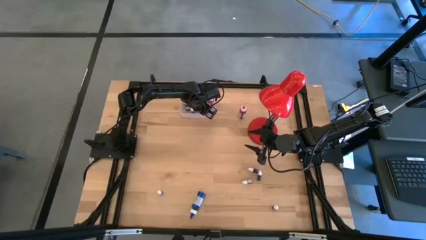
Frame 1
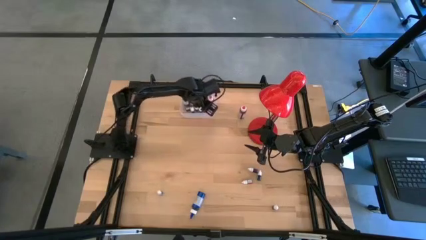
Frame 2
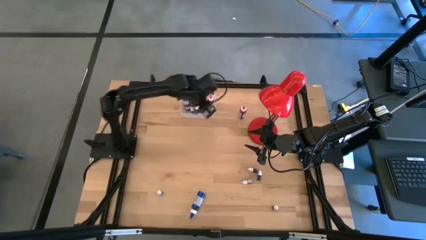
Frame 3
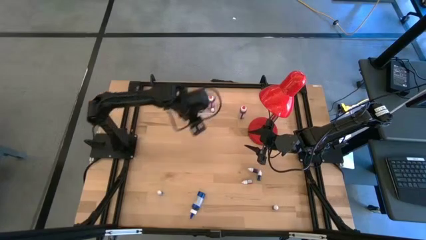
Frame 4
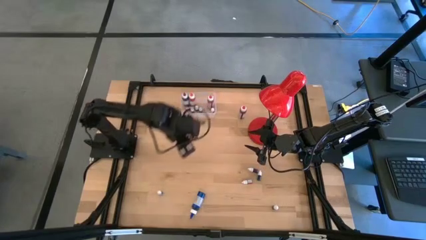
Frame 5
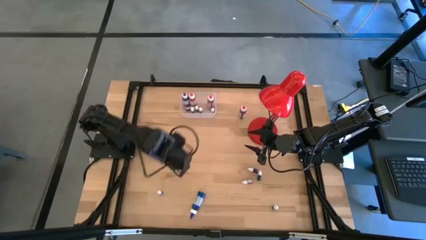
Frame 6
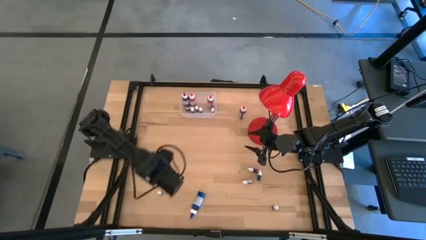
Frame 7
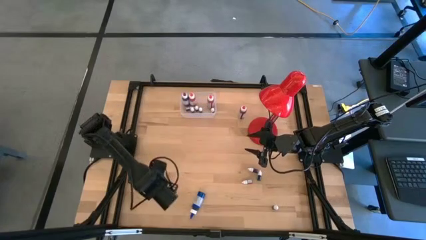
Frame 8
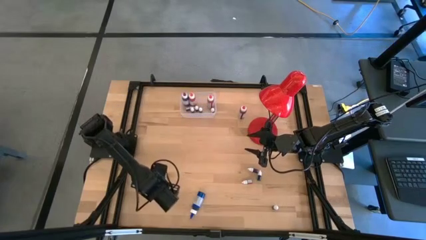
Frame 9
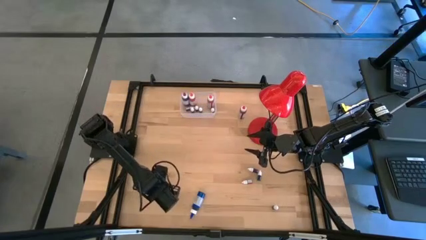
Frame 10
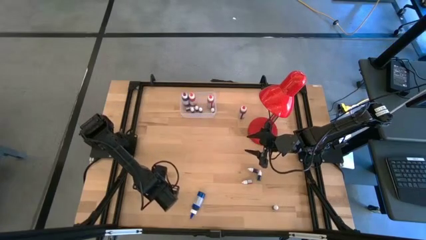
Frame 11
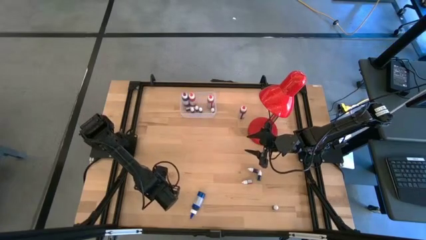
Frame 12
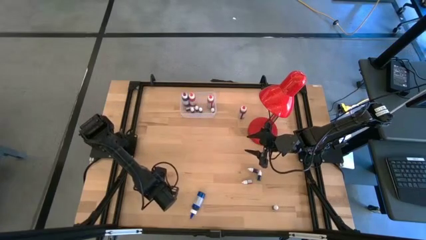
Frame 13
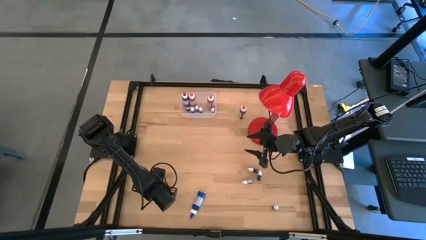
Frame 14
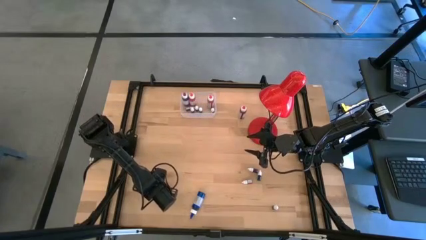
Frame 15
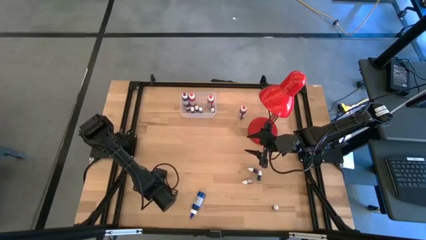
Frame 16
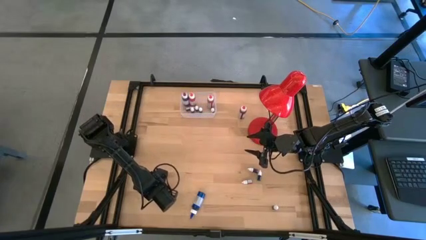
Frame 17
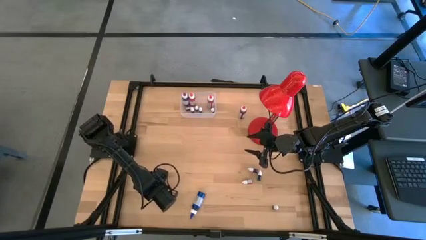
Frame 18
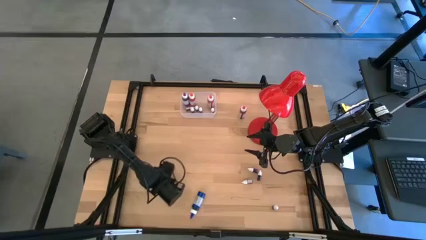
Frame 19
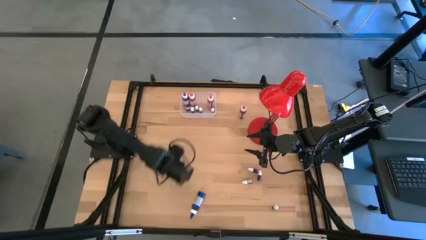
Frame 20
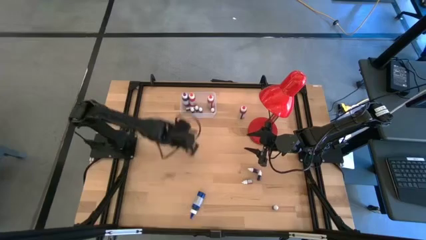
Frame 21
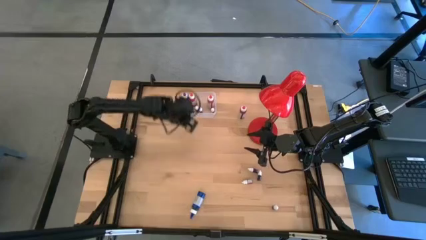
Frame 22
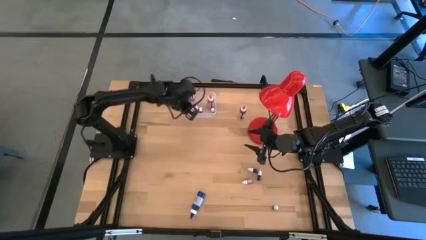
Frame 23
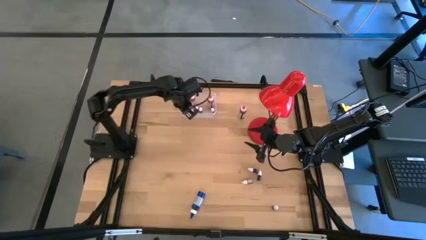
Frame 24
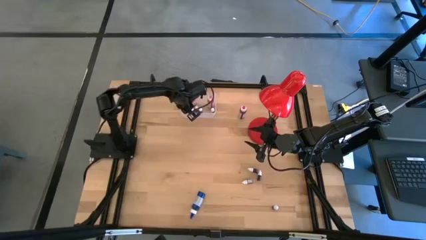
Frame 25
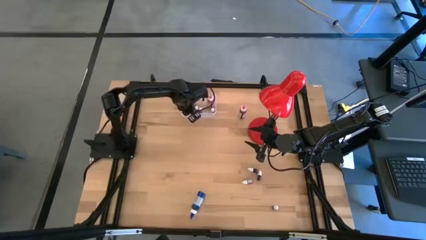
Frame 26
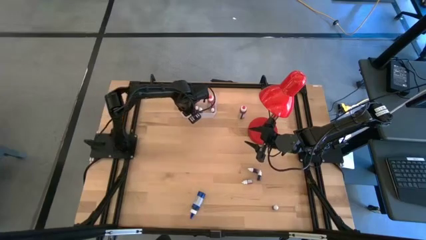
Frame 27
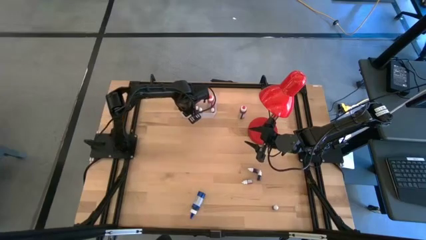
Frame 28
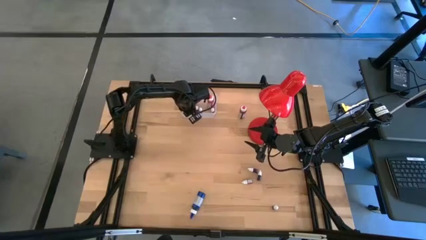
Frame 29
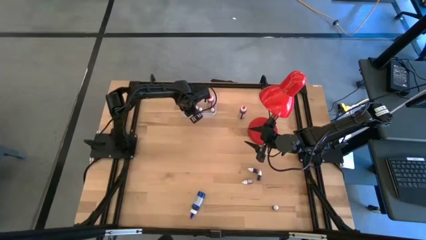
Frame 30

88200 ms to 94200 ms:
Task: Pick & Place food coloring
Put the top small black food coloring bottle into the transparent bin

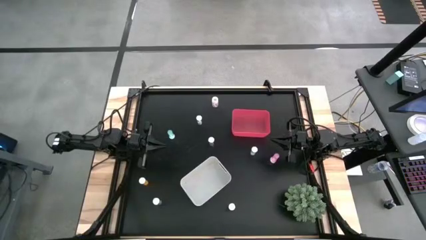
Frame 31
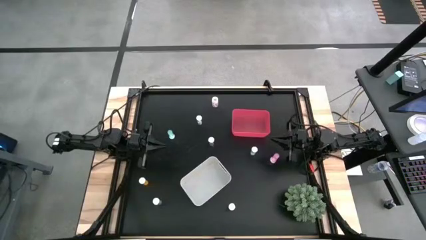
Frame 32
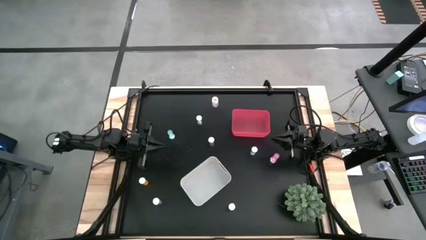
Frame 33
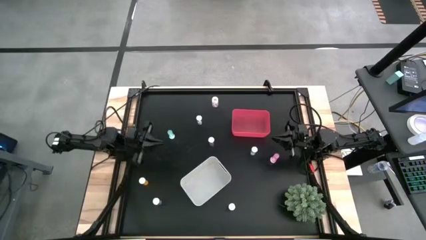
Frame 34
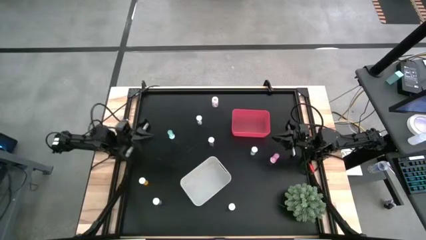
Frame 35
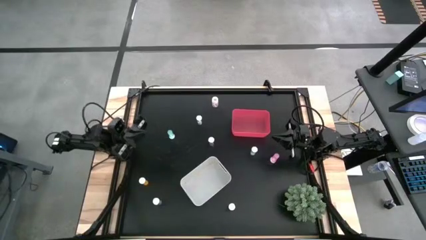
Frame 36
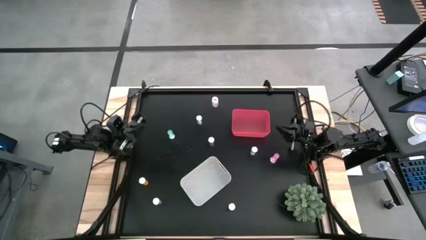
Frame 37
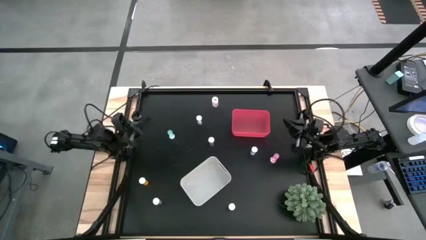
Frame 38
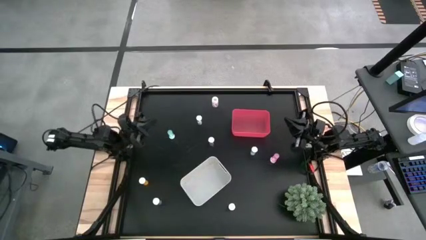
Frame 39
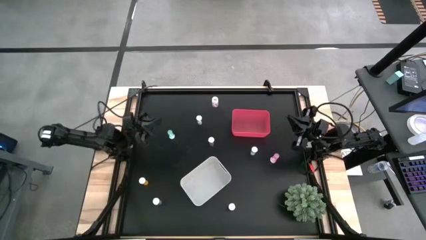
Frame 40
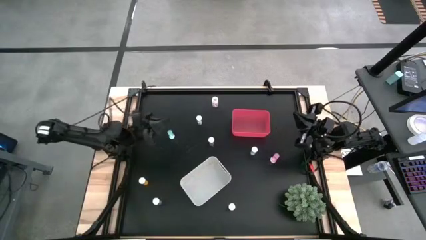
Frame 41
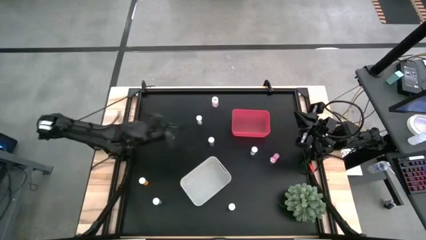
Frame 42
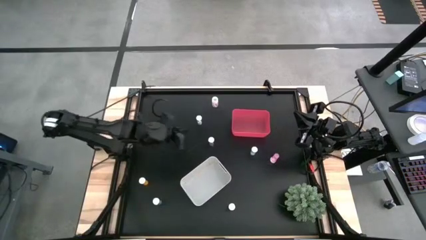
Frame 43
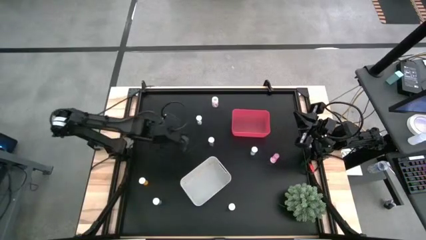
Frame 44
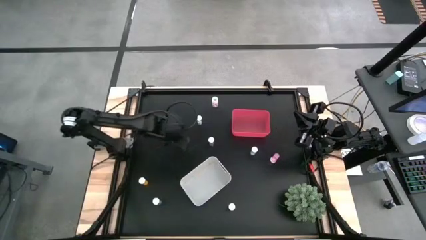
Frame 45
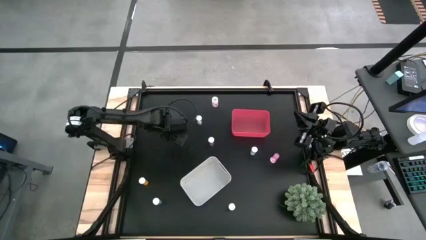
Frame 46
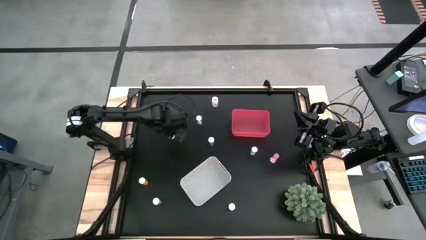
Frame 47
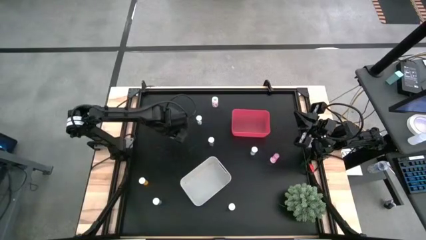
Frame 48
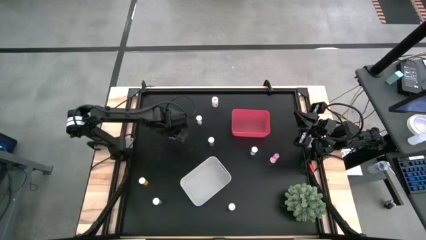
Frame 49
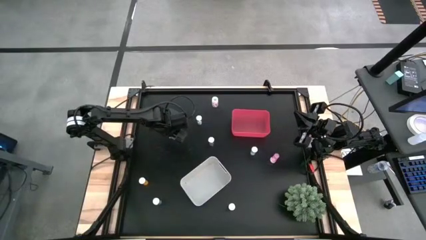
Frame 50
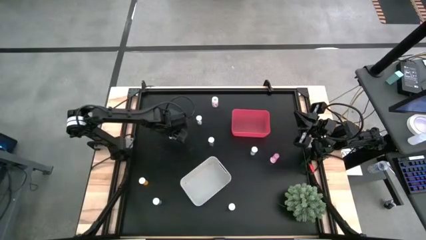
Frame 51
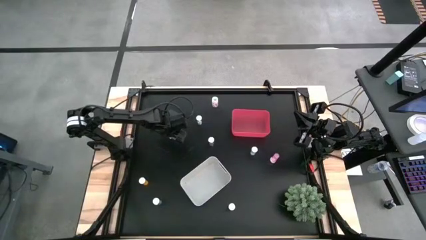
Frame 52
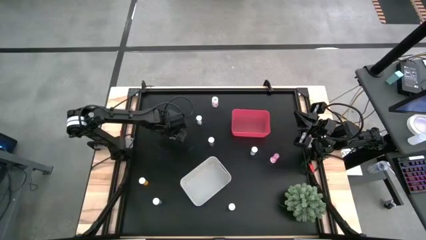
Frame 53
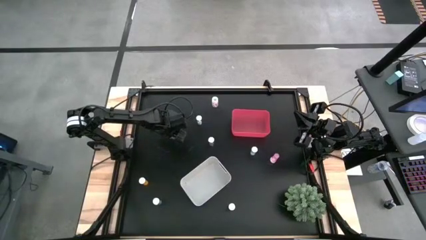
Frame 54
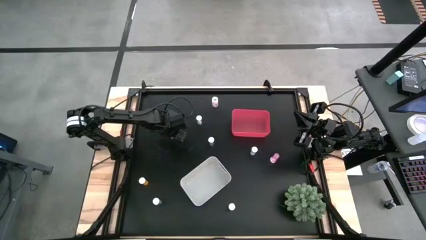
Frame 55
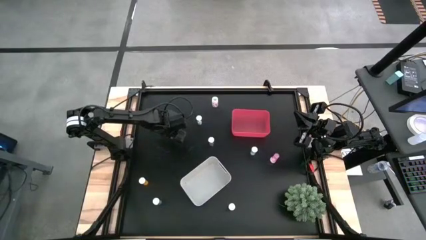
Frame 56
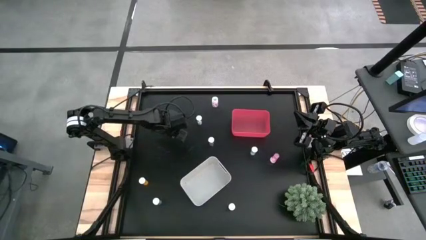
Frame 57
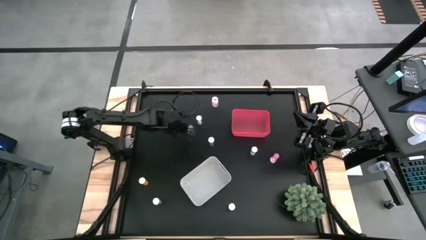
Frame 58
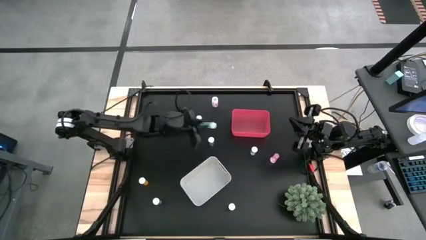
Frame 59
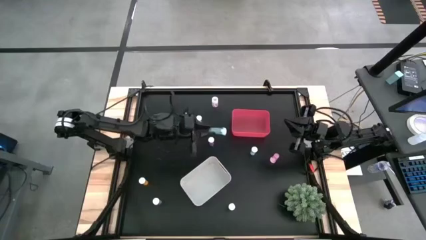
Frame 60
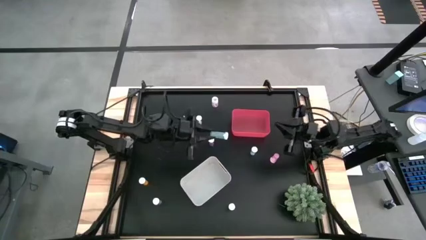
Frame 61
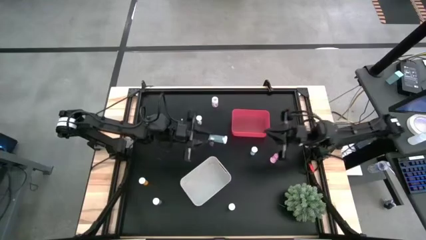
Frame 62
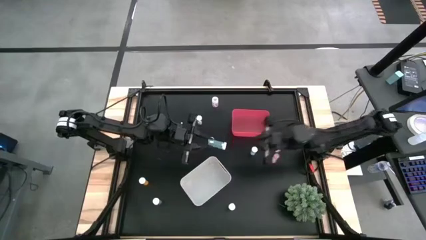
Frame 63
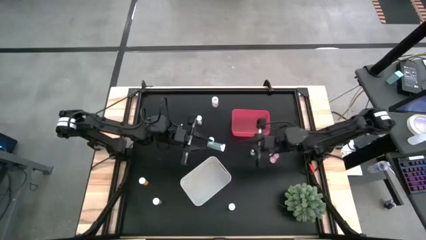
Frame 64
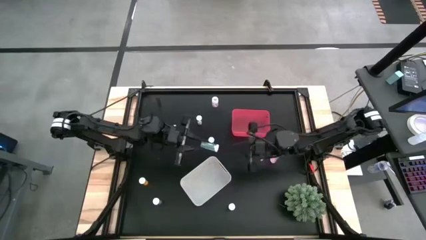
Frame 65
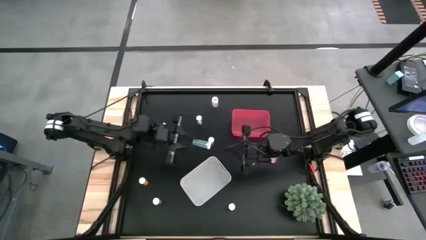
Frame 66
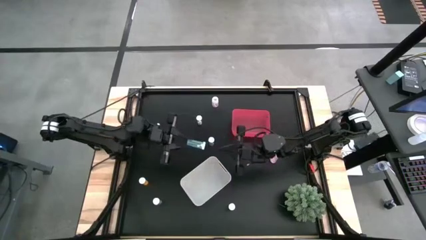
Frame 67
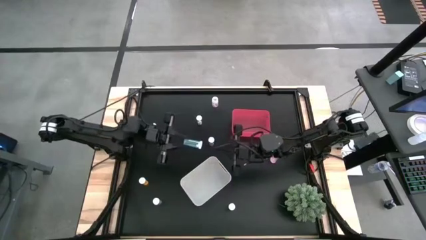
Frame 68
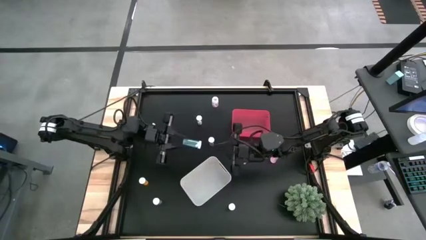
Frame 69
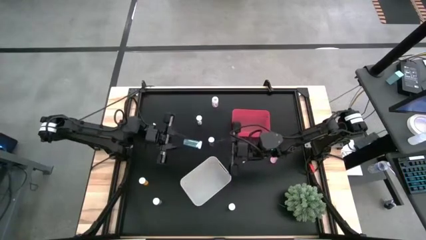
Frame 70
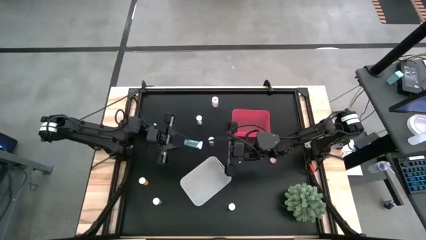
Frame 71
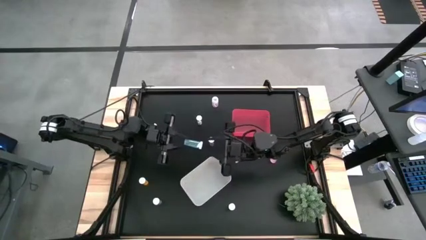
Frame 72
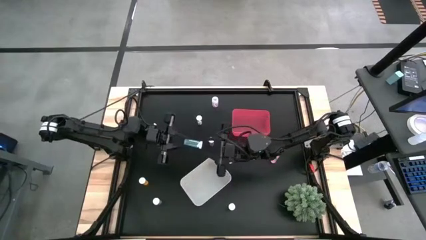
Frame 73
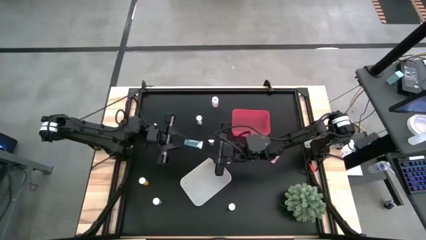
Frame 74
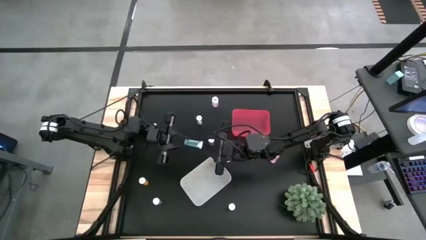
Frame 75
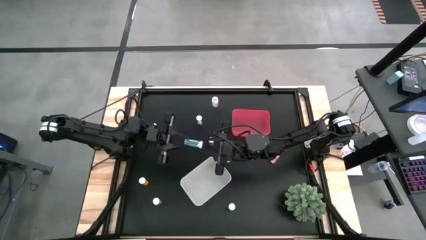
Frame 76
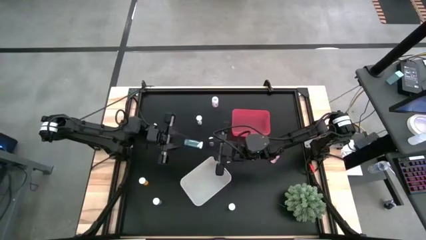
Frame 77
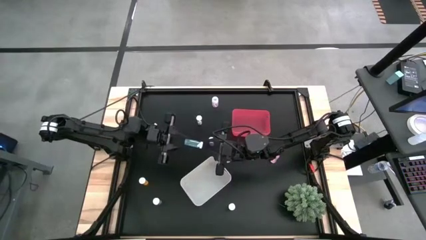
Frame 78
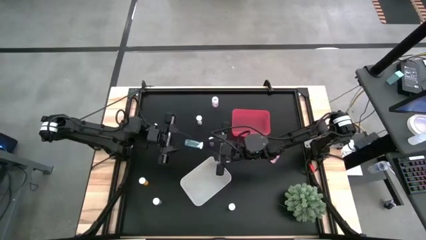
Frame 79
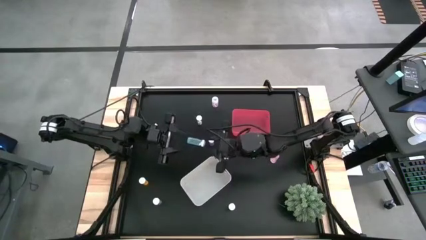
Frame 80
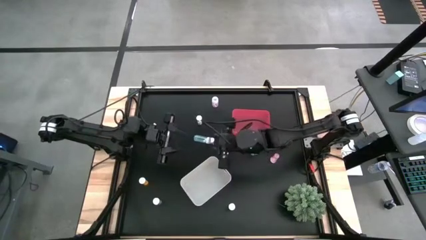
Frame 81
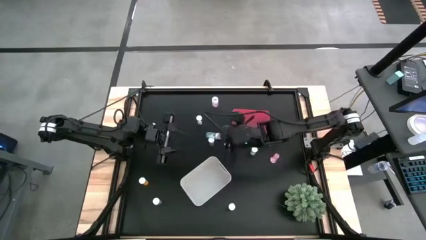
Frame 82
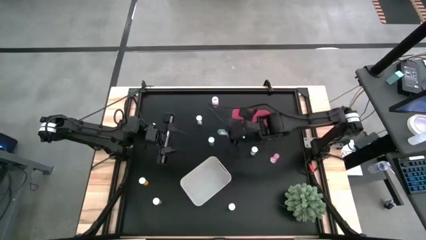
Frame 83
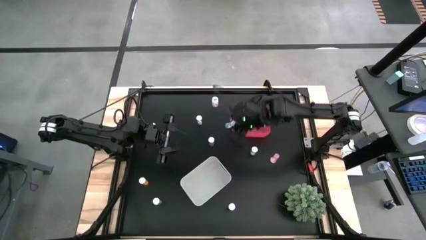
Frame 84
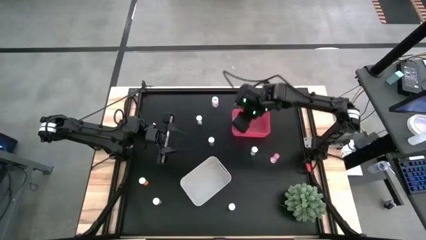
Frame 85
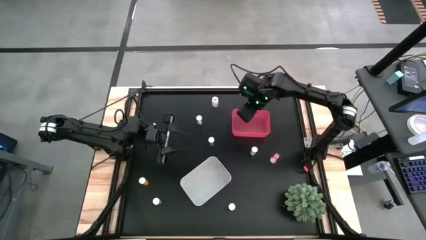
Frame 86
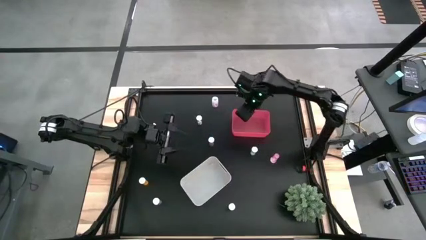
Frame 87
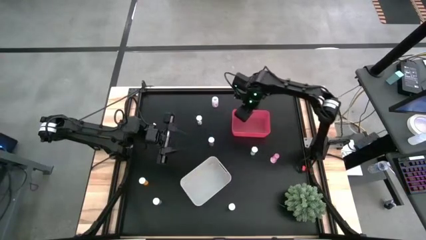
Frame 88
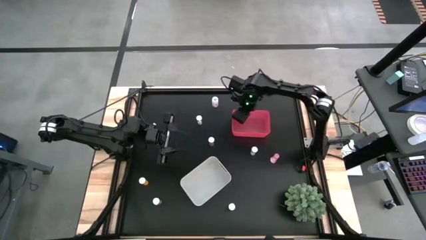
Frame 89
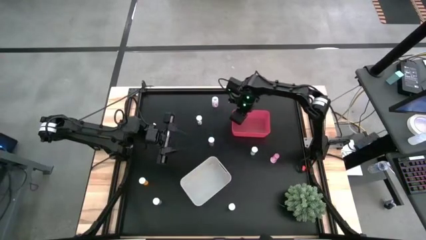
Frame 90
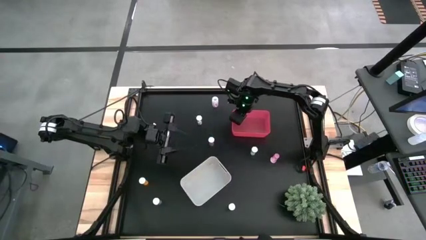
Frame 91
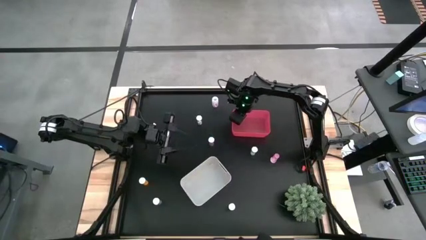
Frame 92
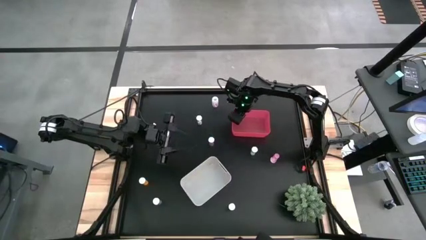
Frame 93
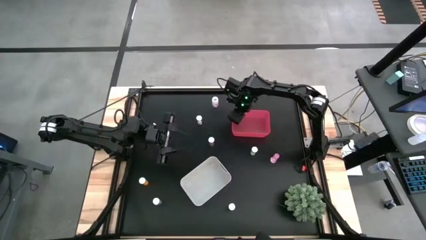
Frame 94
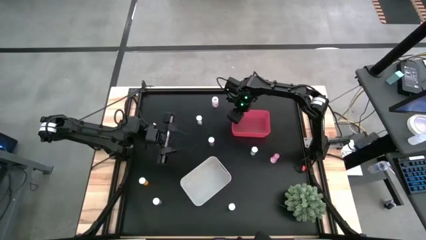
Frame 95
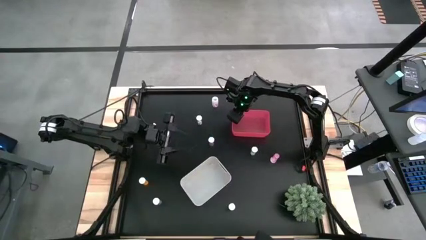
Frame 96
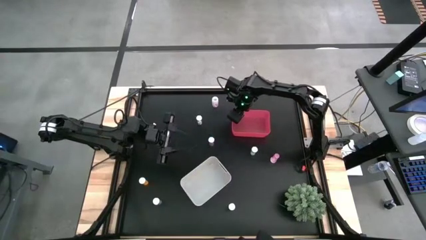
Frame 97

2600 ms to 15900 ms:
Task: Pick and place medicine bottles into bin by pill shape (circle, oval)
Put the left blue tablet bottle into the red bin
